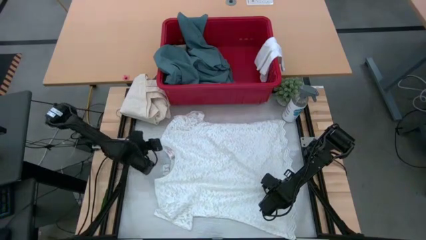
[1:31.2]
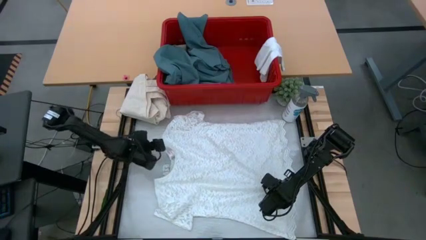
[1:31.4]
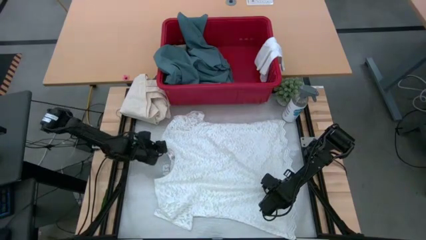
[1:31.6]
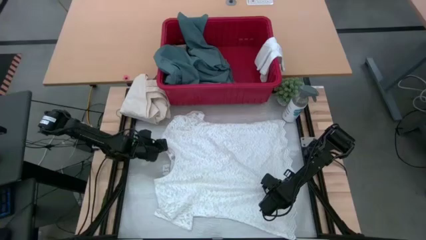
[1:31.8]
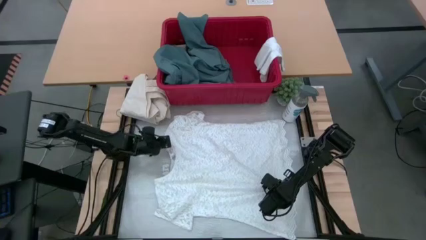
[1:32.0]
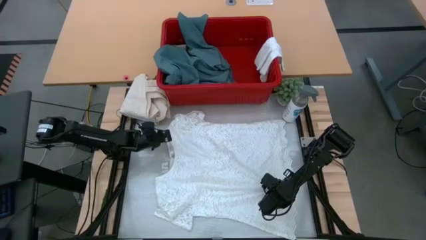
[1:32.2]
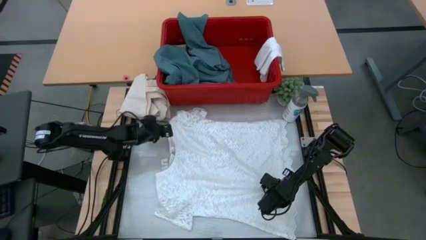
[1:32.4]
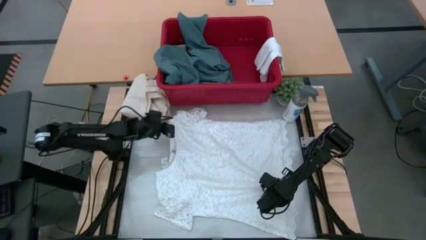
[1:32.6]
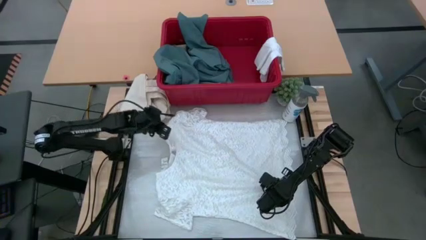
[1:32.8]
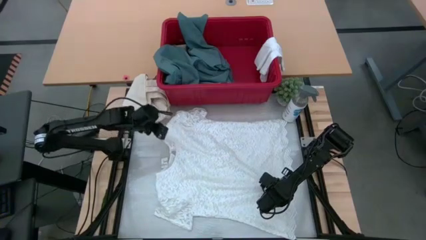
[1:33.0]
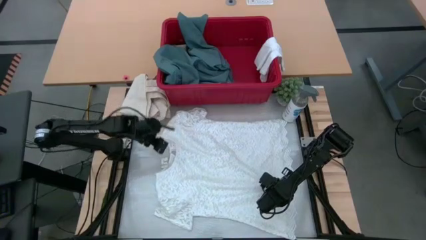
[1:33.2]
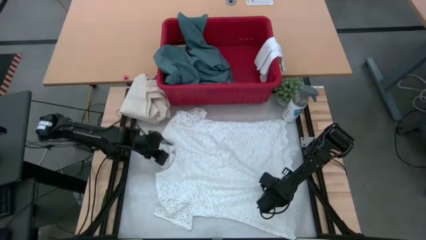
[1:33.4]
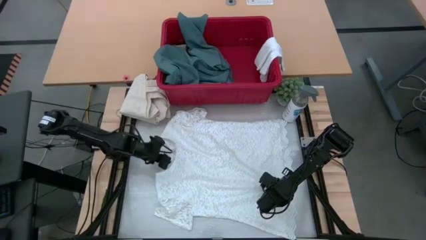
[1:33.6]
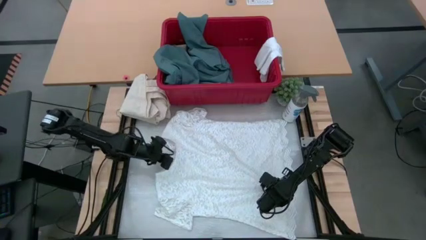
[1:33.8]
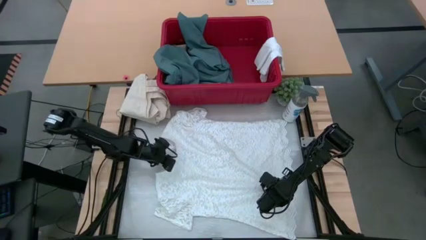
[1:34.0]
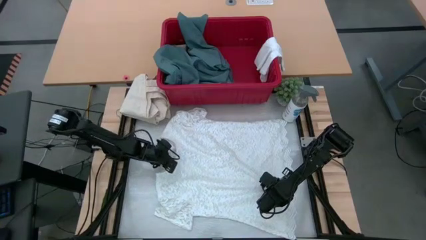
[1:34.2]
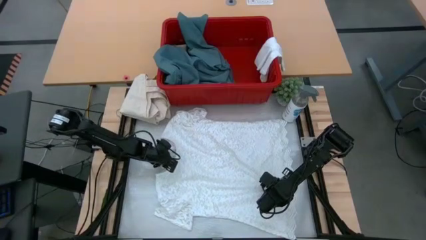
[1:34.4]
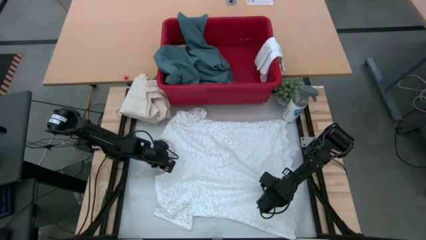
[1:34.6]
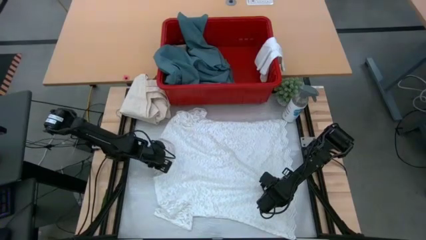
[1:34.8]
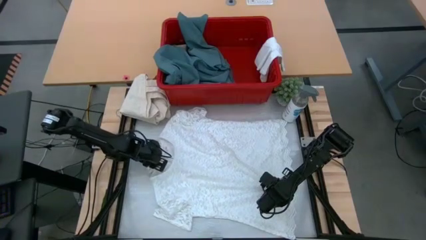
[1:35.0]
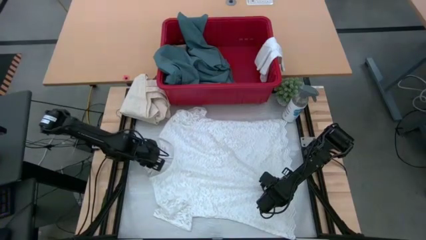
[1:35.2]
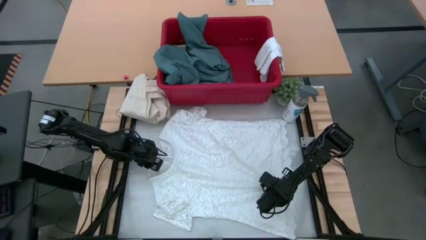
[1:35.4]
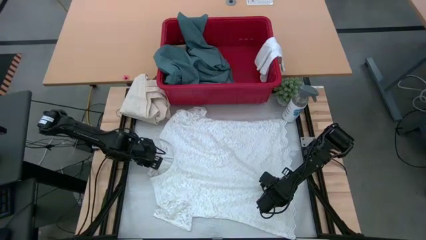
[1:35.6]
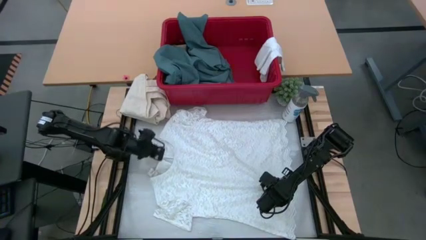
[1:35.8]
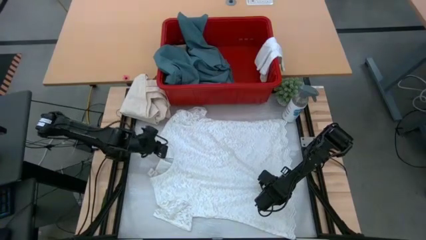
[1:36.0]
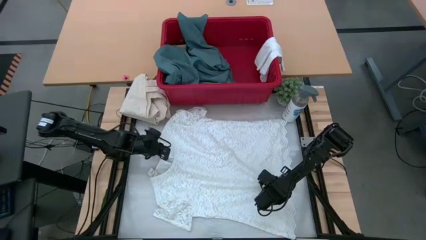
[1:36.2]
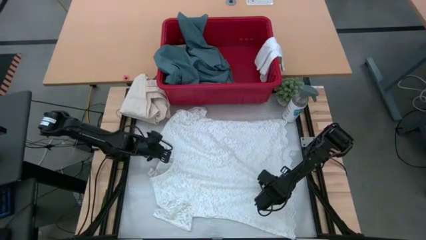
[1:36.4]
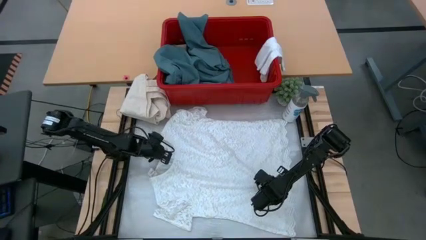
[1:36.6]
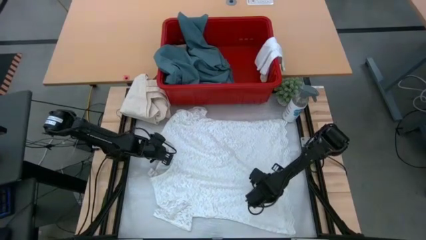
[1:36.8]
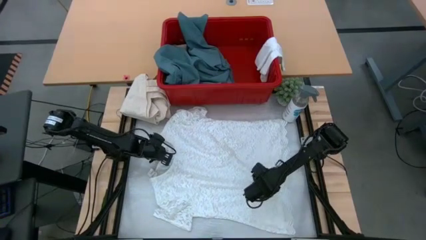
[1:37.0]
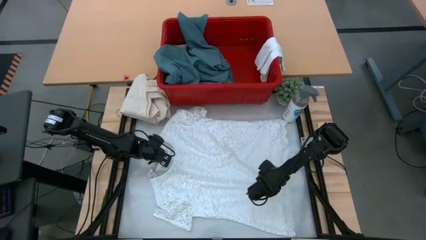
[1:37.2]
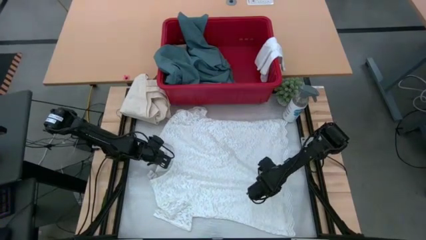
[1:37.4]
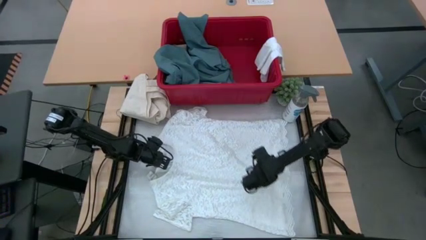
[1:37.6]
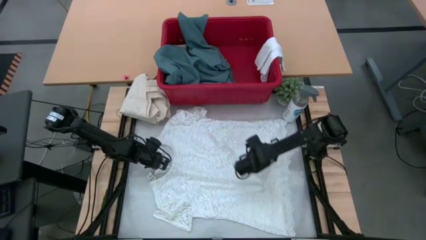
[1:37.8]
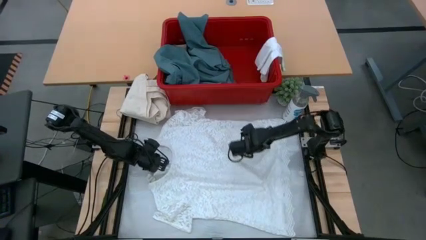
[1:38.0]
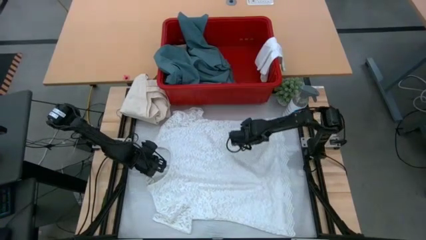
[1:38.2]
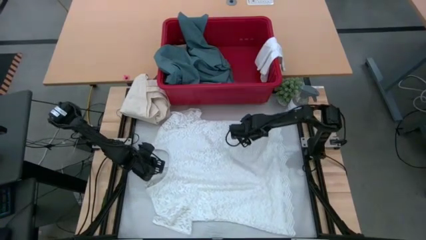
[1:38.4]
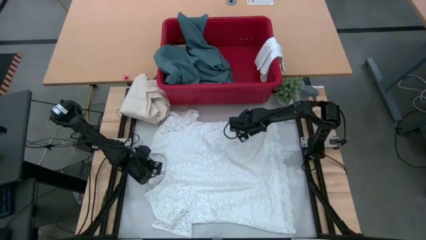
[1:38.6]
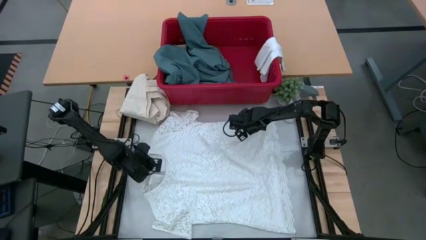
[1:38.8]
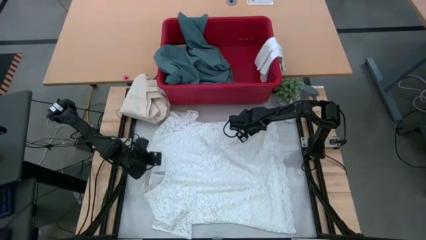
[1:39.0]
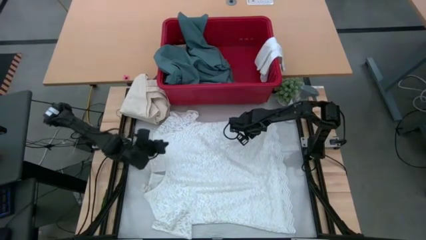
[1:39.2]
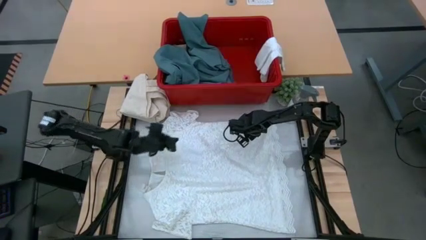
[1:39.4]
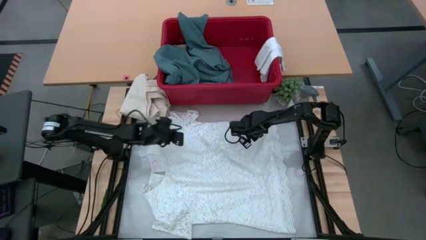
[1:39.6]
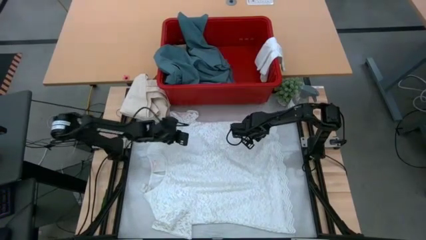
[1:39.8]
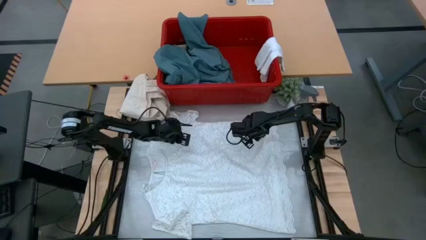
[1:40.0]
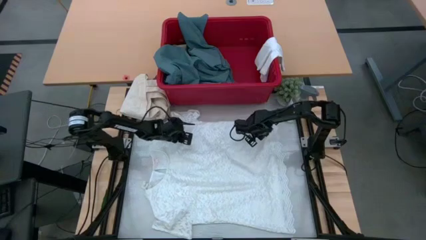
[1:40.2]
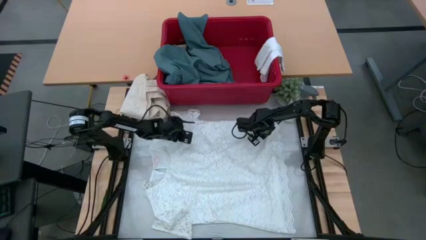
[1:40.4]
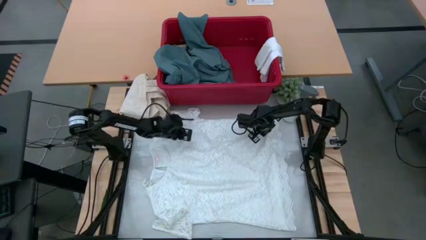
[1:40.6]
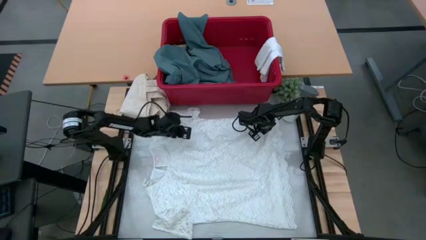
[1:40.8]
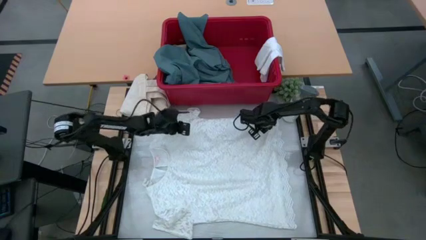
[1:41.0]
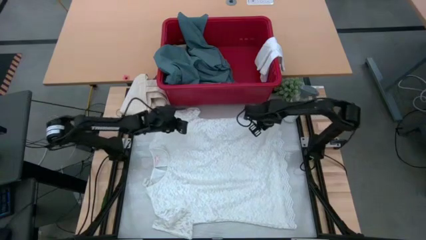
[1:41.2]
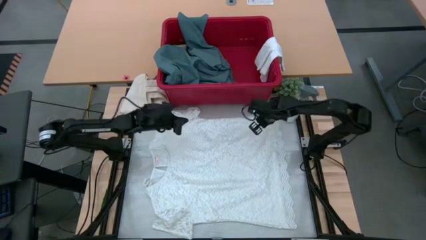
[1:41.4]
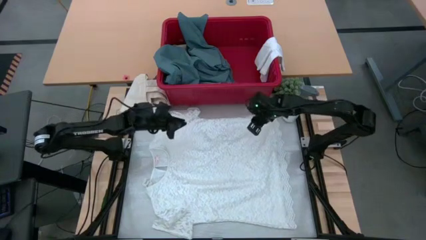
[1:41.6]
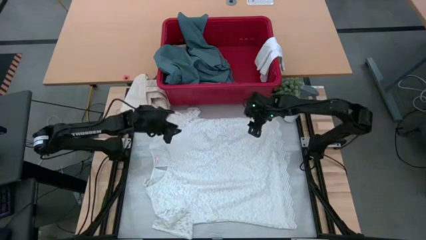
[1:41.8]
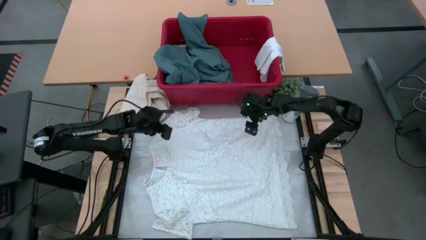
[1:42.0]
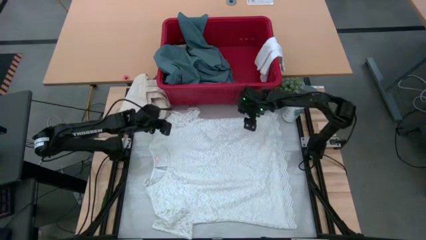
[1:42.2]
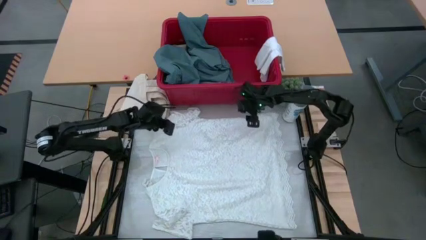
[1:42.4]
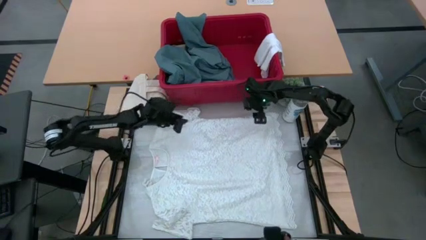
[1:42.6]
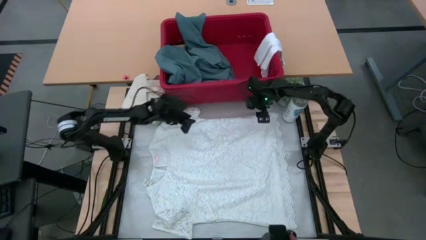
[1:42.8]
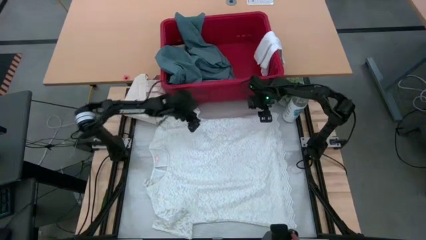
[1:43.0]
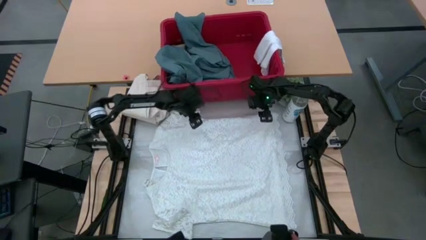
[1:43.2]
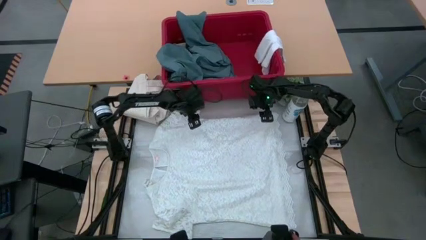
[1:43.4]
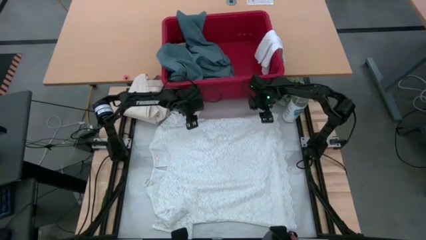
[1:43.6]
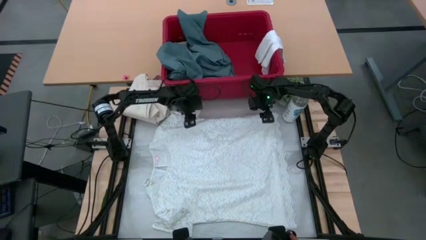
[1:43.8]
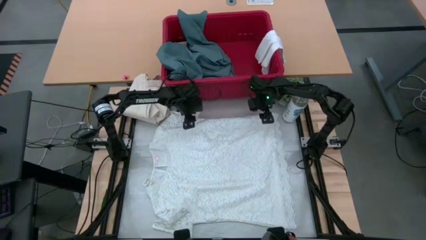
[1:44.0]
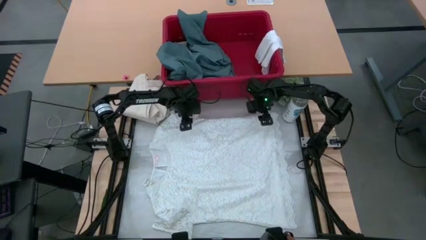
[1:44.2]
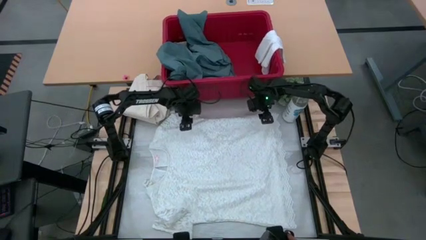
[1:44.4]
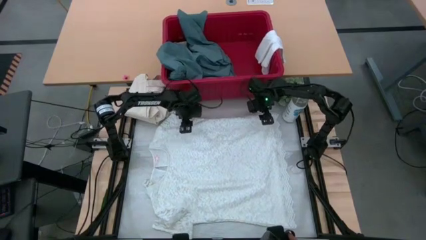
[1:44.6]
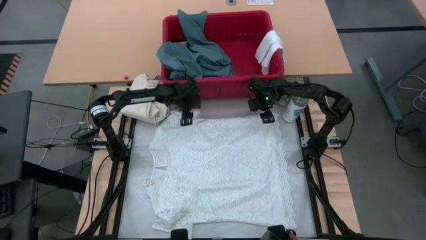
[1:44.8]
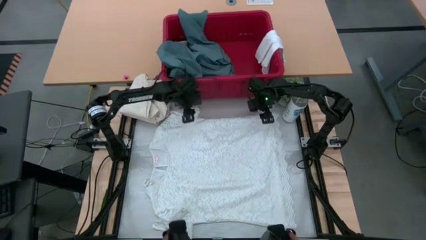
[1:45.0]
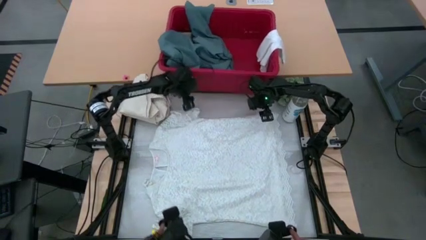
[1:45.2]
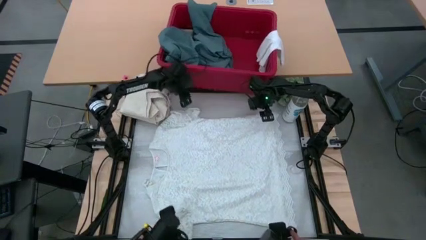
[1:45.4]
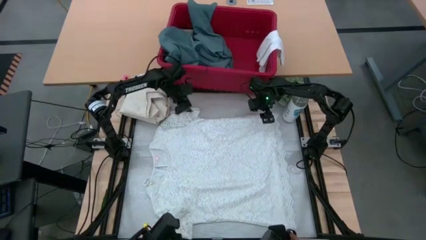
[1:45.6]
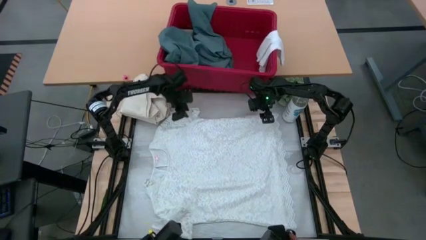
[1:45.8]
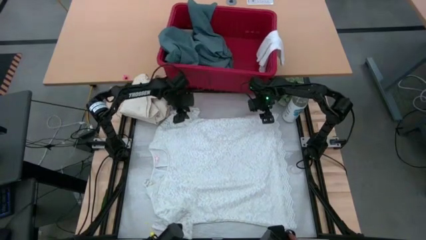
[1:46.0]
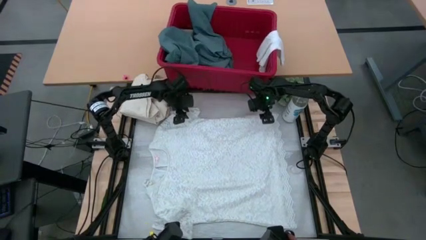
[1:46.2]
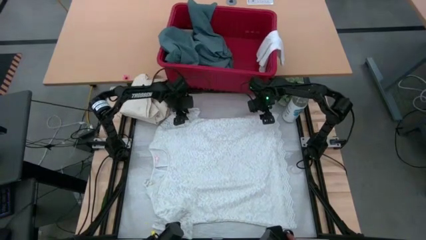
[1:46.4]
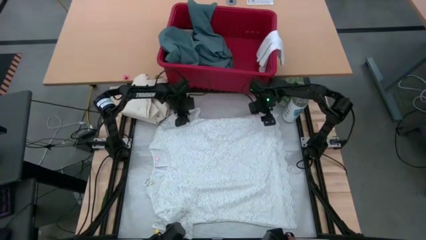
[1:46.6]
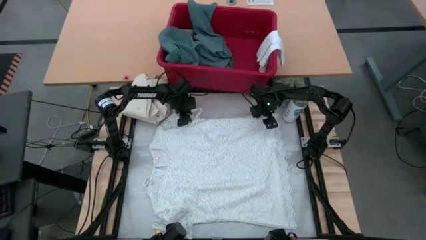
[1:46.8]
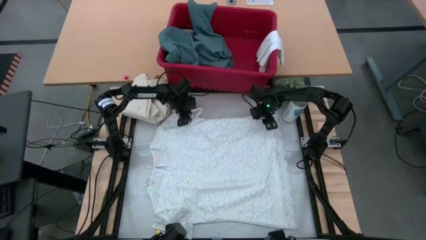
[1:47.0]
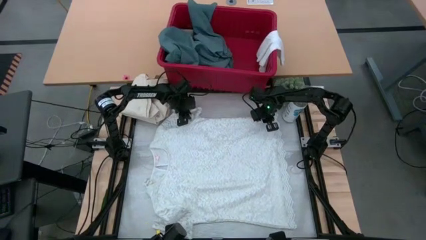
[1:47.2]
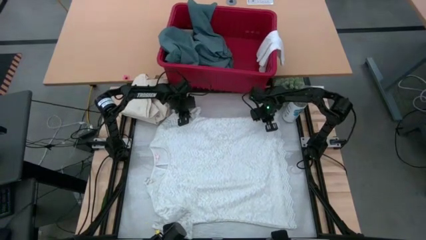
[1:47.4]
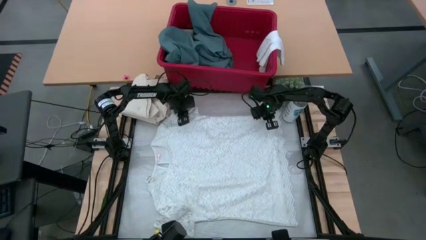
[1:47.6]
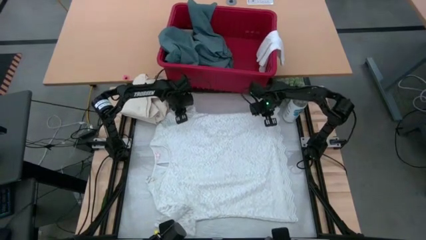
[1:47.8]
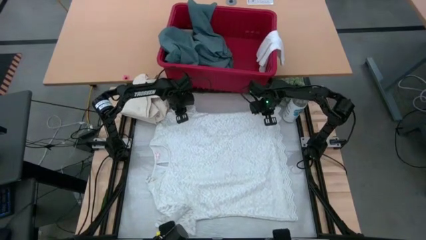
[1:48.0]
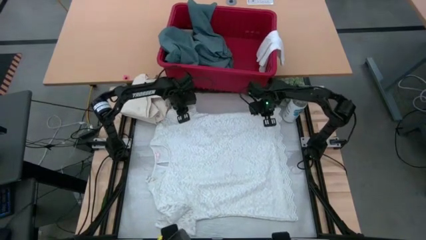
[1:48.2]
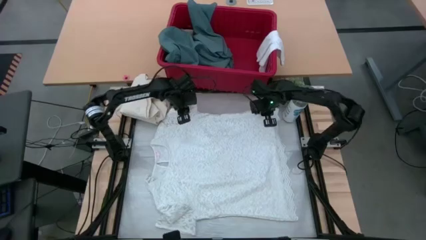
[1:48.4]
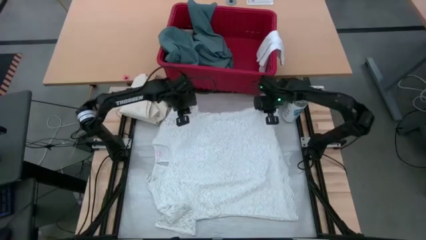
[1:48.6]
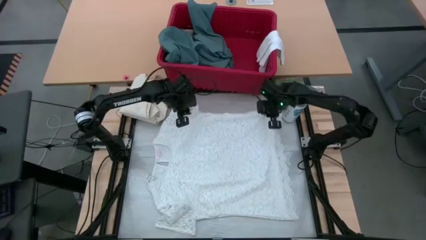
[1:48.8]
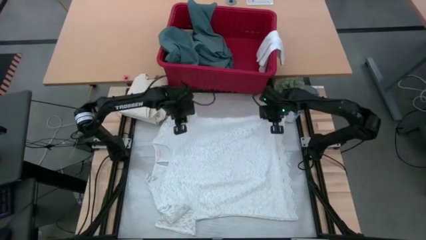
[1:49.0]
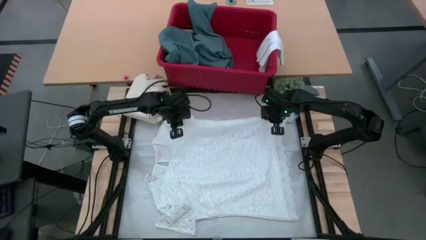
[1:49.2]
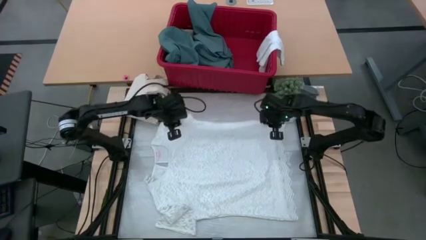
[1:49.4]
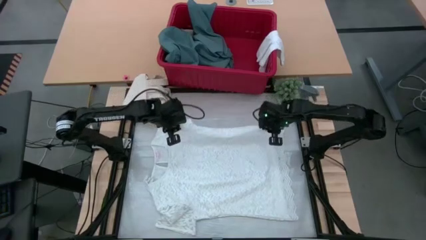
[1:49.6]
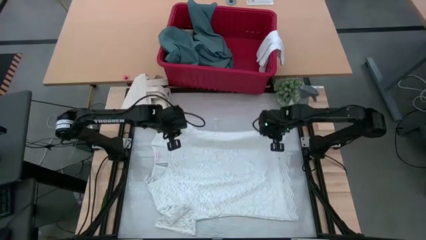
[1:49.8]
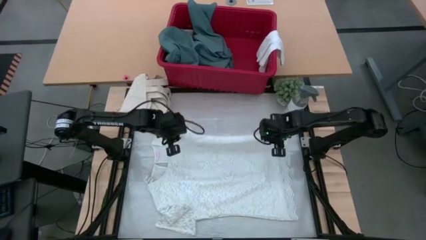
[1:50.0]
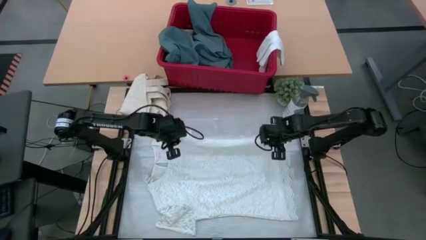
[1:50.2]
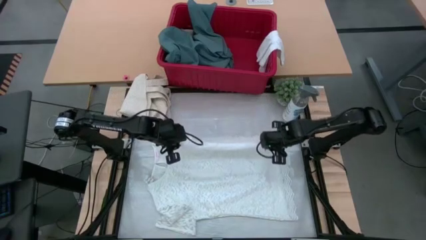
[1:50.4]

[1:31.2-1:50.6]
Task: Fold Laundry from Bin
Fold the white shirt
